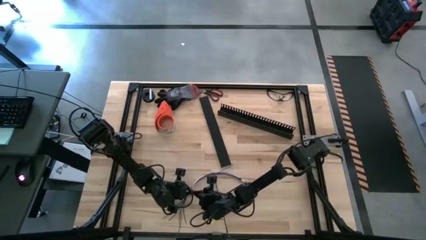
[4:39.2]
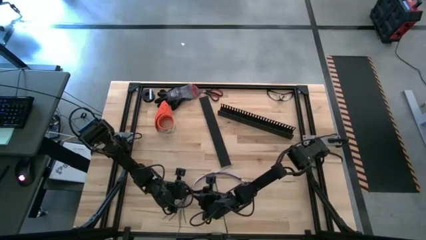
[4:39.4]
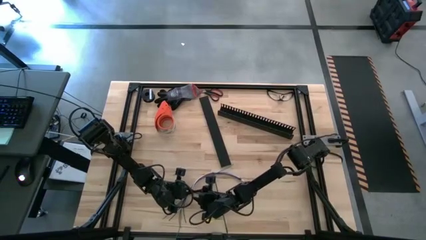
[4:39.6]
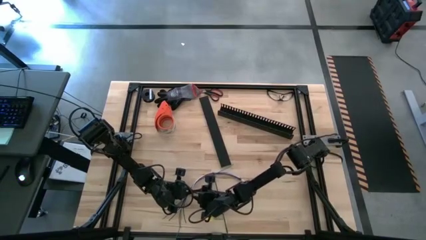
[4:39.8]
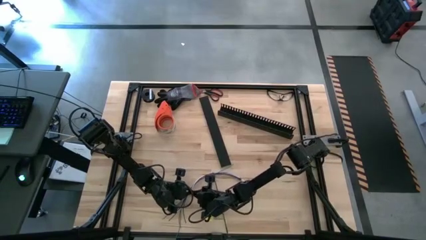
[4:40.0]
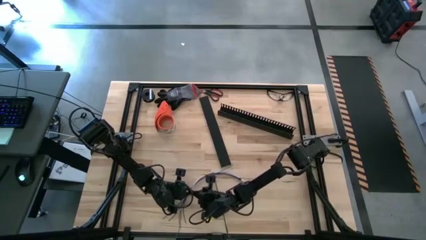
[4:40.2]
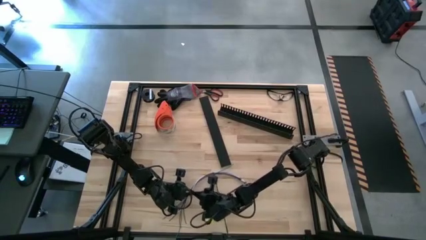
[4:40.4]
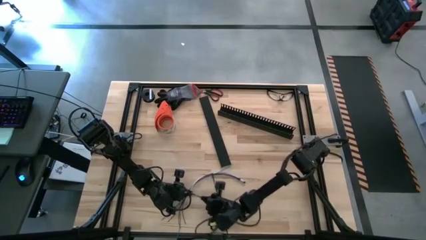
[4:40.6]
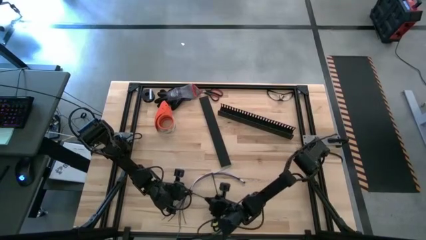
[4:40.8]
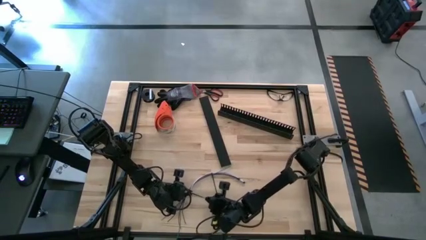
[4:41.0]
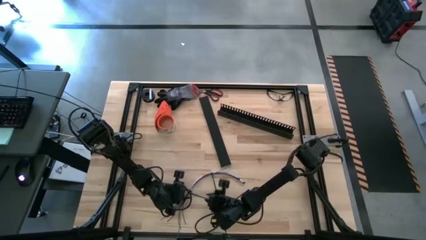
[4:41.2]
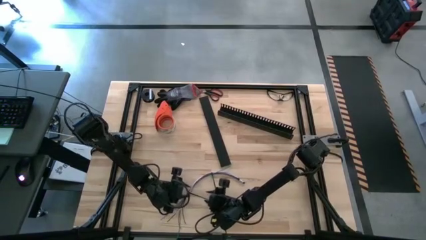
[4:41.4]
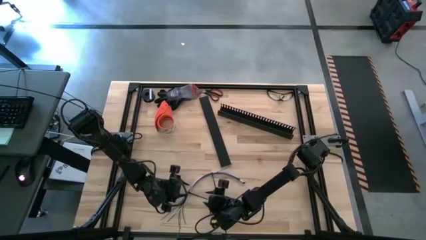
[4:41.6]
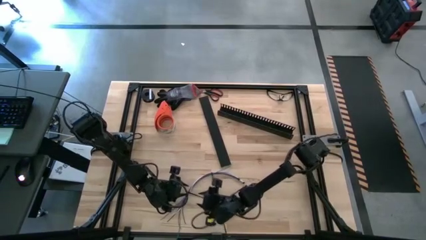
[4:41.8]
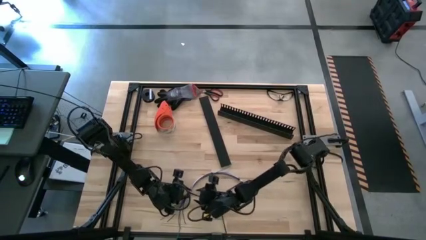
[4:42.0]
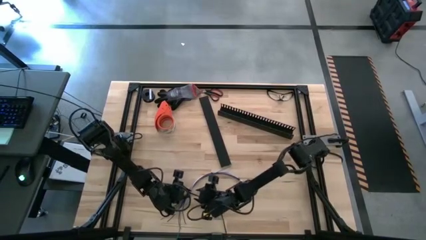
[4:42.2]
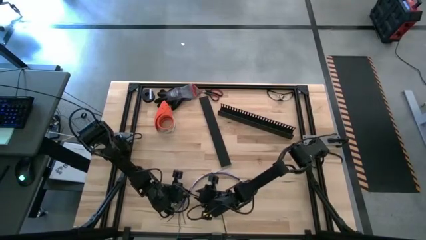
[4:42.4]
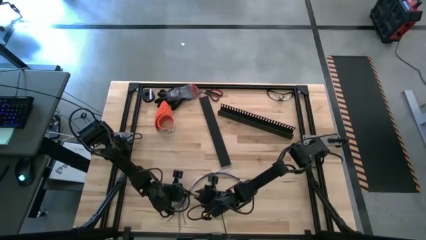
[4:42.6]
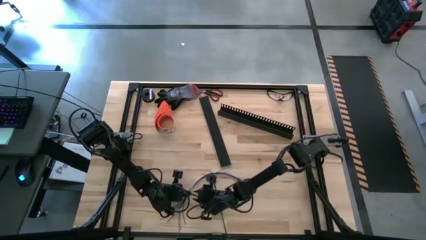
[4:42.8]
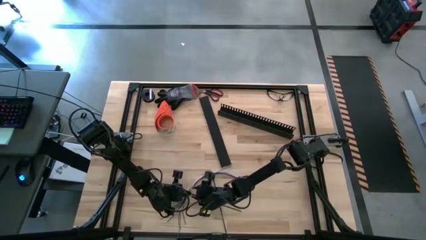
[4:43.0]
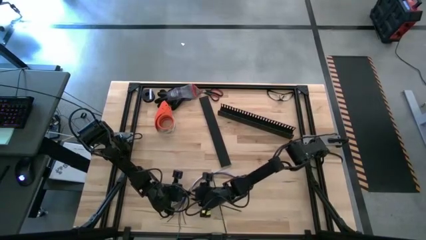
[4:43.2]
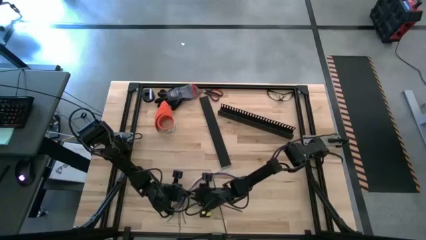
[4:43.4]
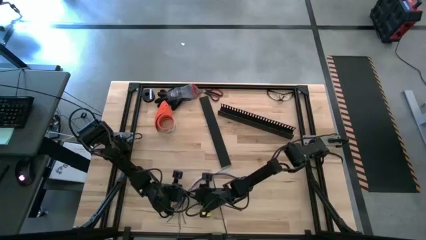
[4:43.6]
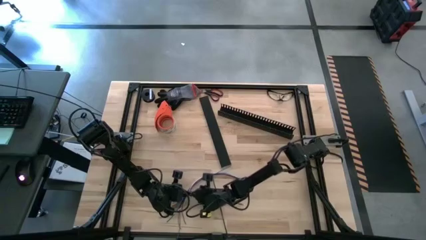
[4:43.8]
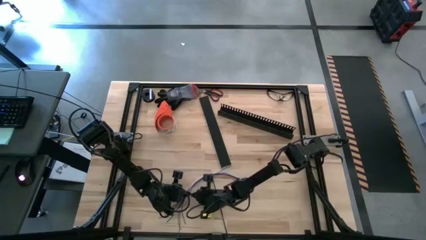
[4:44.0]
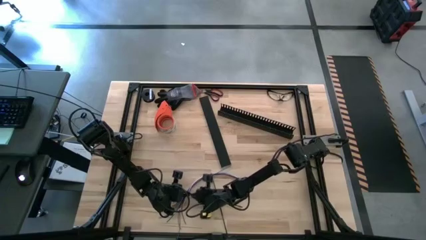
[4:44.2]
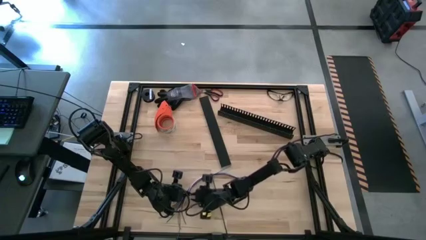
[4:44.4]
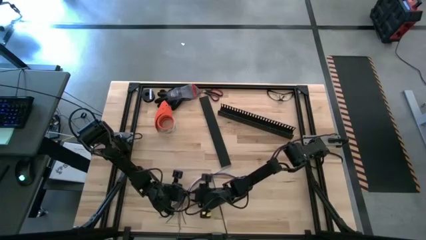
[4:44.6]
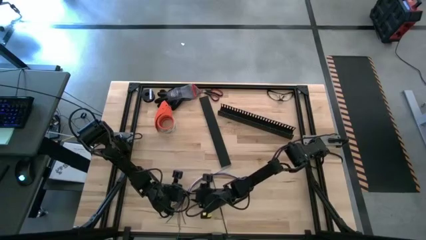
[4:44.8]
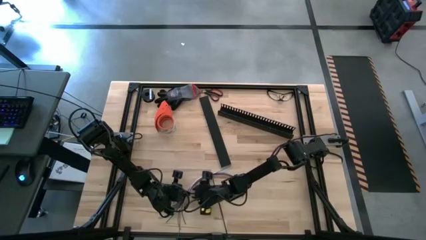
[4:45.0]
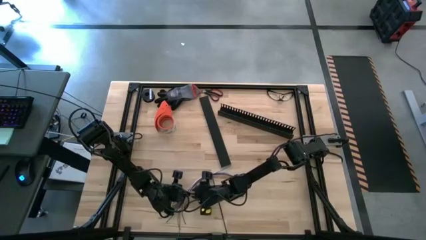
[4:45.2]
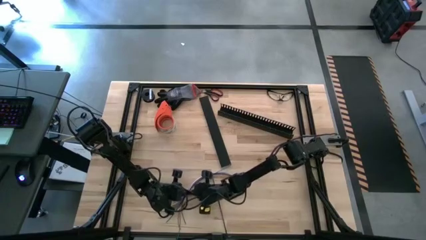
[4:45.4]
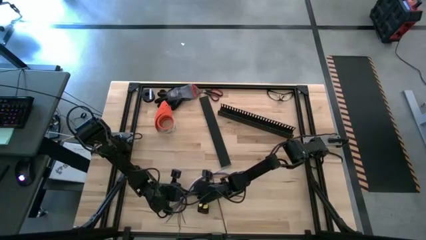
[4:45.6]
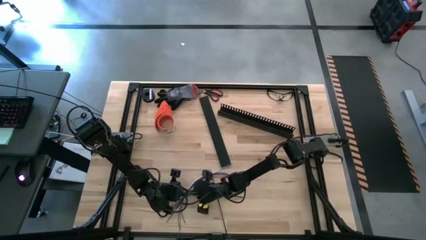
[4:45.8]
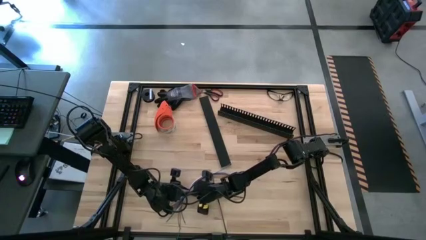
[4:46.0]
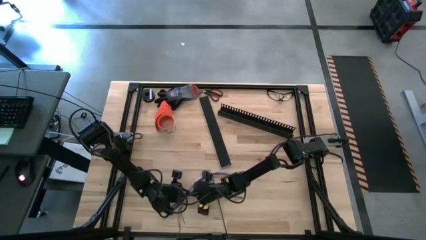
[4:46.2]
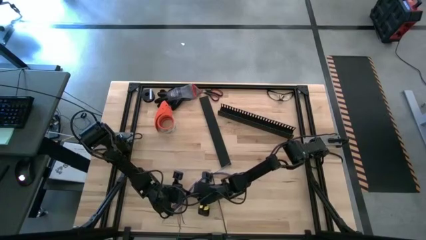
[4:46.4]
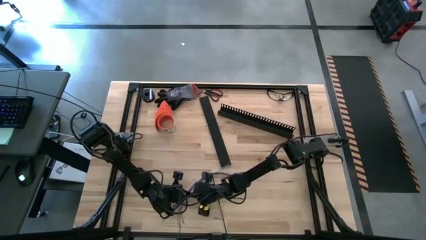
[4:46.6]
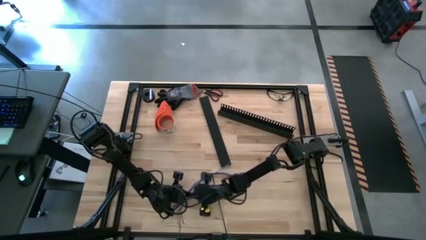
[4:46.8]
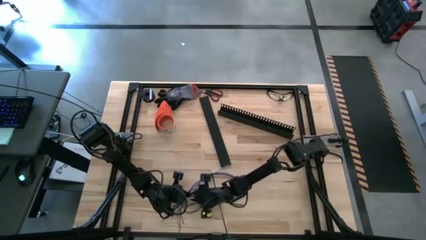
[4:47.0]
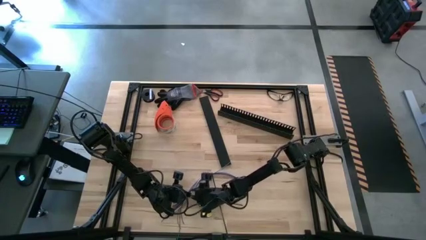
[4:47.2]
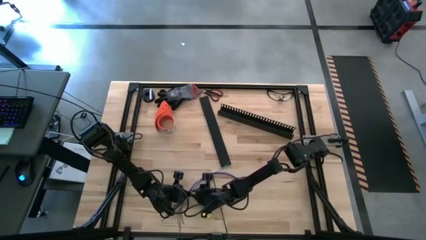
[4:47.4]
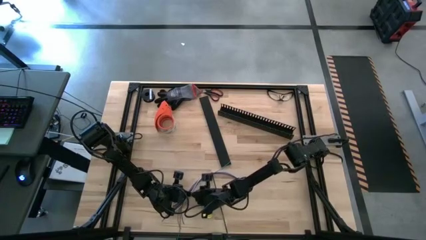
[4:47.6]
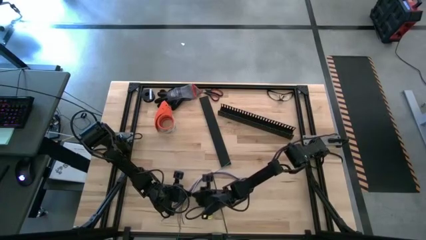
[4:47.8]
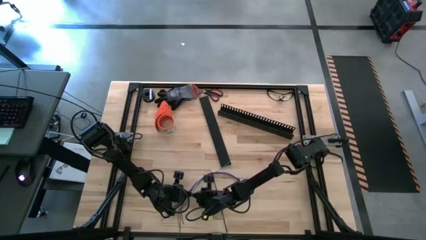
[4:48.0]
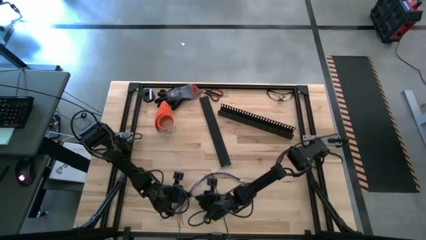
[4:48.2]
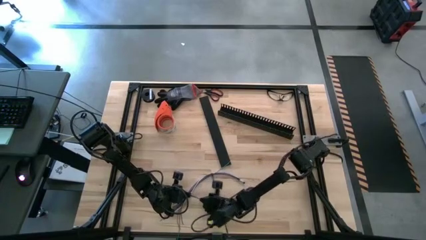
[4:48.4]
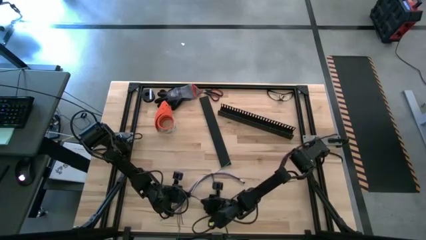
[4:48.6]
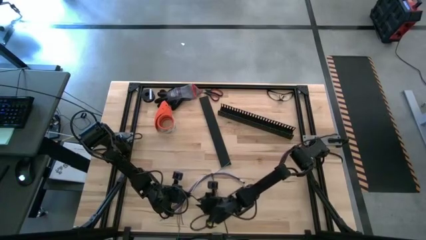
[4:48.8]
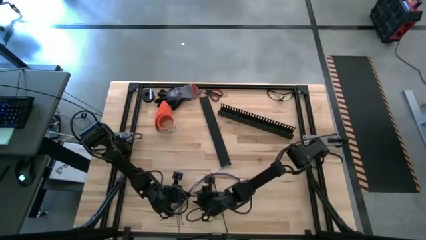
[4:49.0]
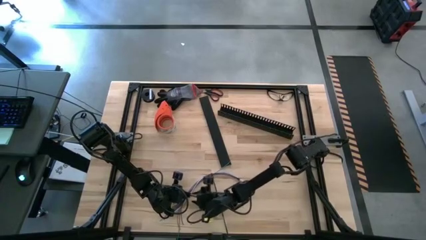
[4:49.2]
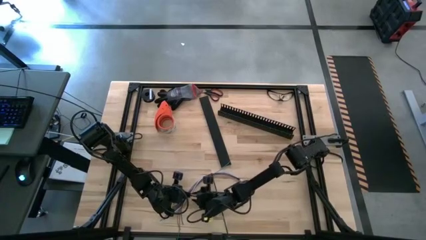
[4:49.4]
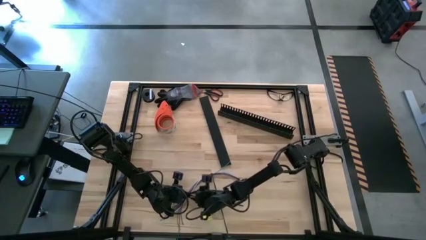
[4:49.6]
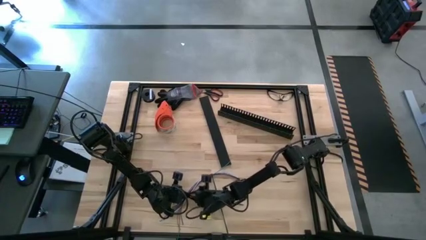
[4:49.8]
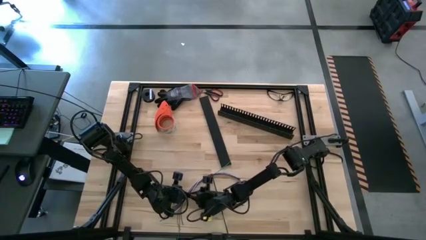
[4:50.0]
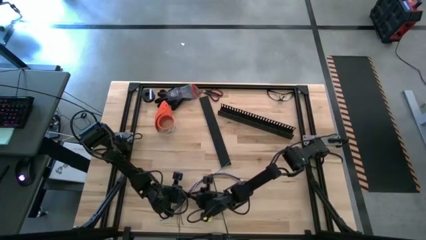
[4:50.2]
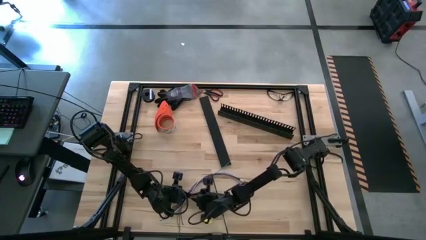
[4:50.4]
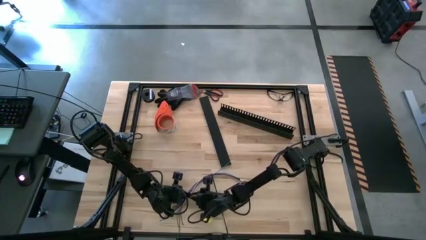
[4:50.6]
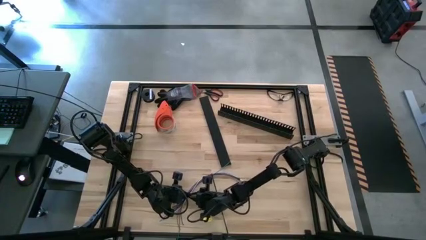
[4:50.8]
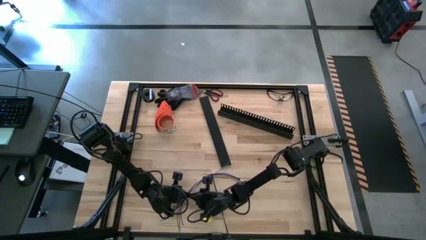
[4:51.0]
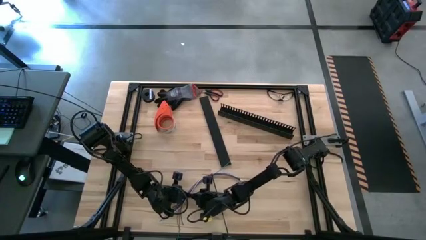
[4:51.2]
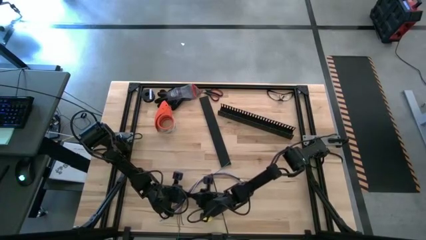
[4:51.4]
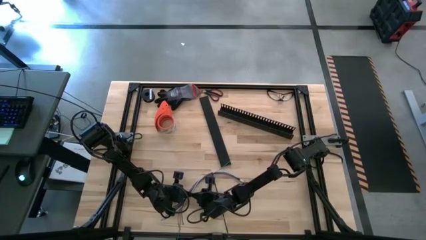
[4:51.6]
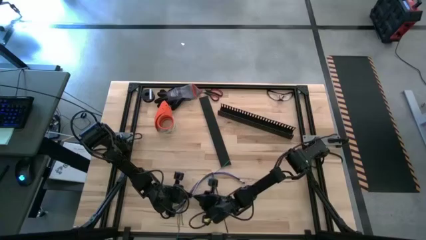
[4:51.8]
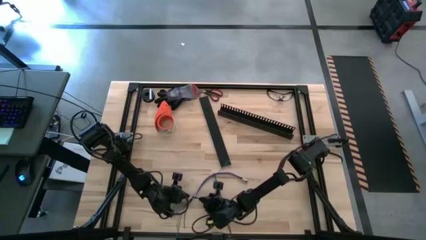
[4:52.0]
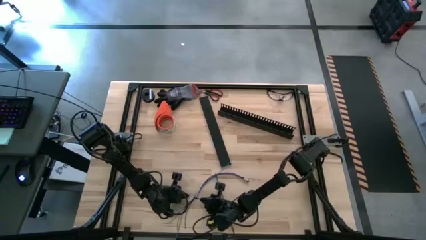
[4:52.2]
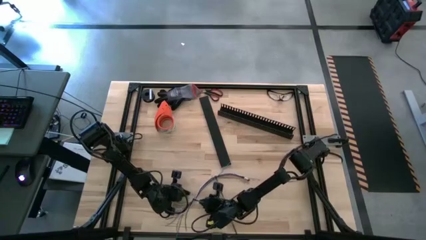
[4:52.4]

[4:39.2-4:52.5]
Task: Ziptie cables
Wrap the black zip tie on the cable

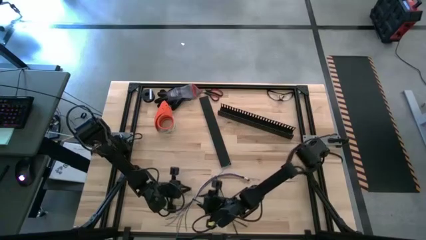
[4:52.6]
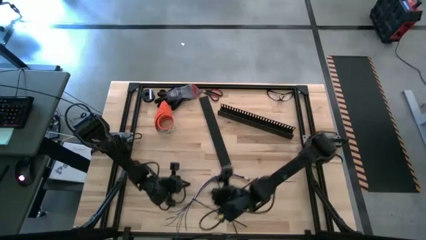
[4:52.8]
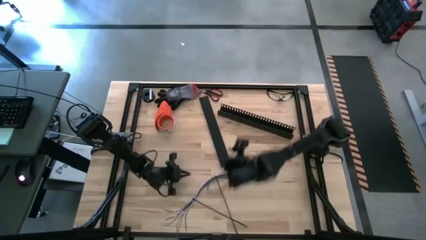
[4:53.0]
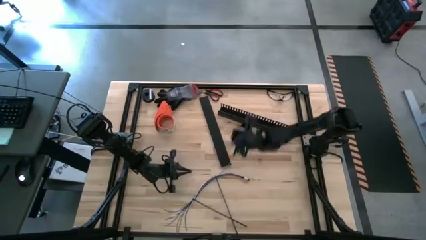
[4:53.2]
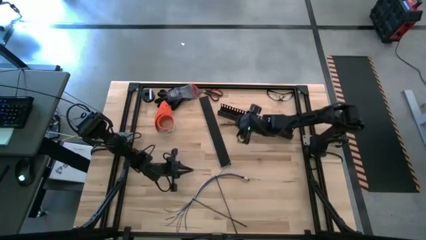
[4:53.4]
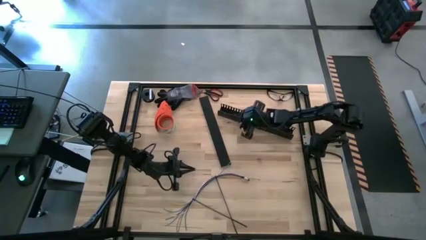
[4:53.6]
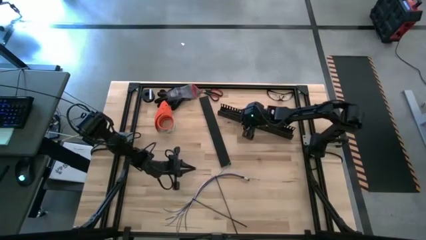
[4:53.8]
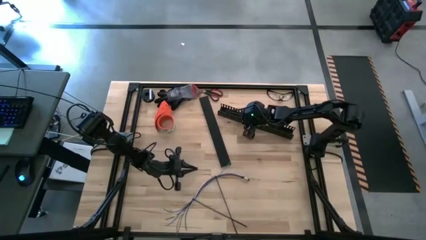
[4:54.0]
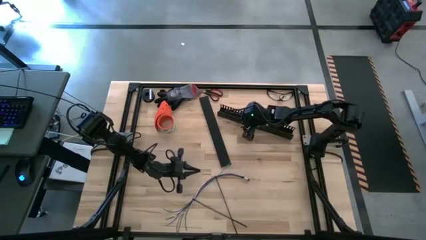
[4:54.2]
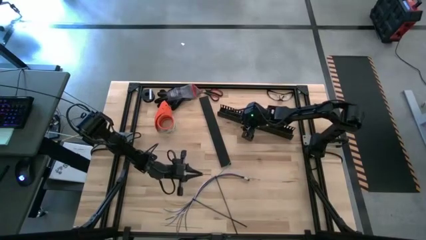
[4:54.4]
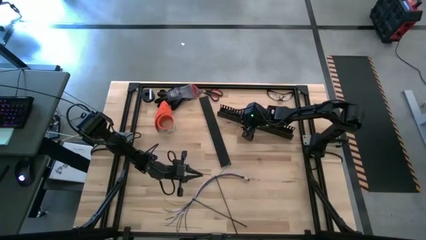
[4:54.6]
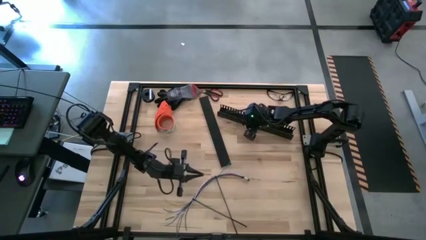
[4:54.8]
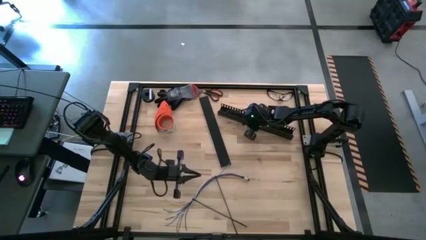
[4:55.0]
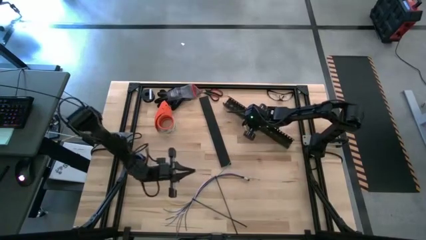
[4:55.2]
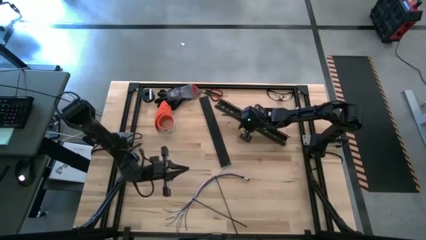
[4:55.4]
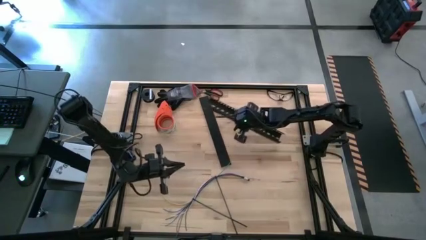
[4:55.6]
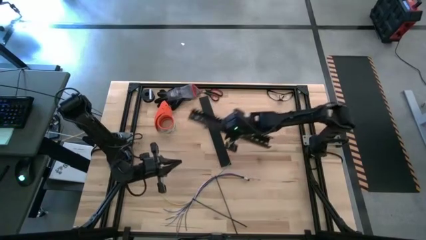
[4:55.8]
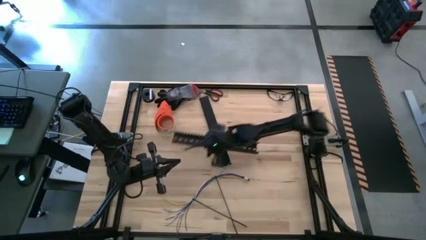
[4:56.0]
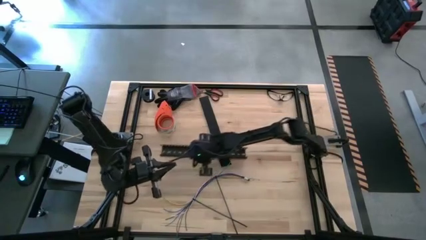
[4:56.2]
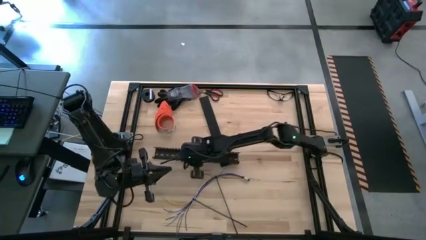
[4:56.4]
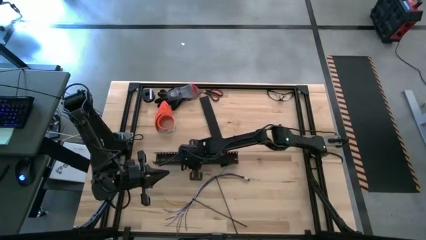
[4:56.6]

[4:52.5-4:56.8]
Move the cable duct to the center
